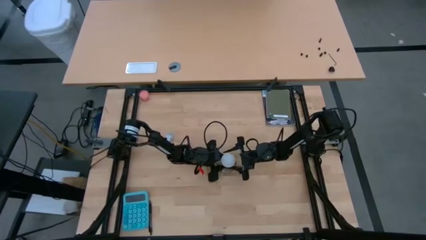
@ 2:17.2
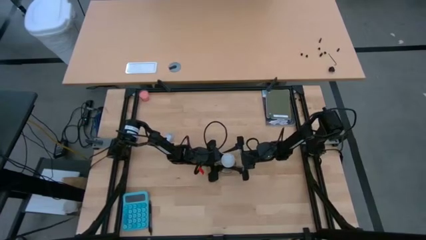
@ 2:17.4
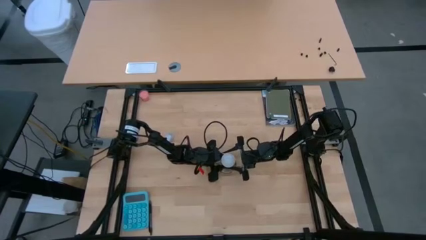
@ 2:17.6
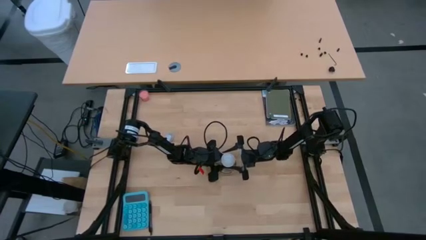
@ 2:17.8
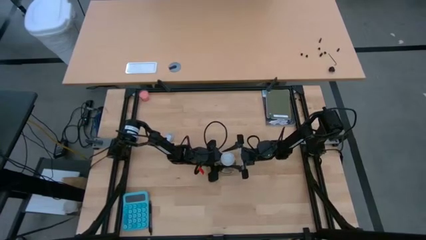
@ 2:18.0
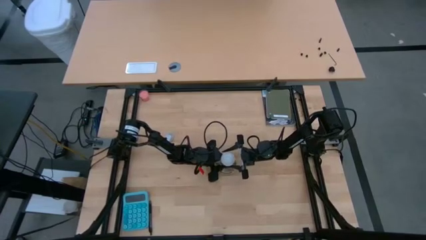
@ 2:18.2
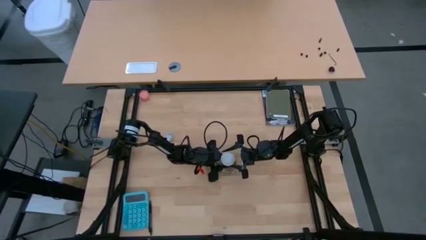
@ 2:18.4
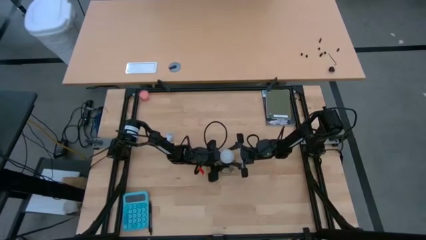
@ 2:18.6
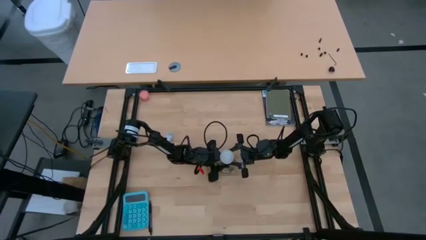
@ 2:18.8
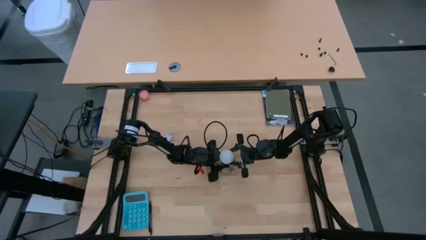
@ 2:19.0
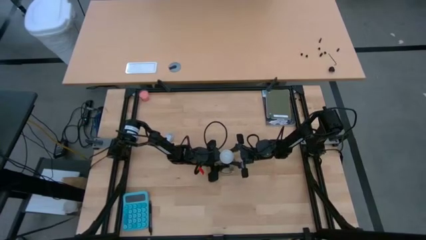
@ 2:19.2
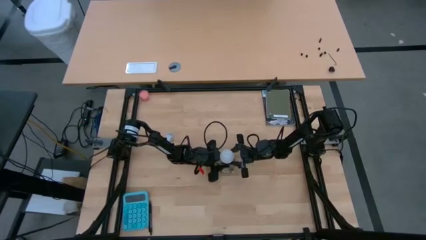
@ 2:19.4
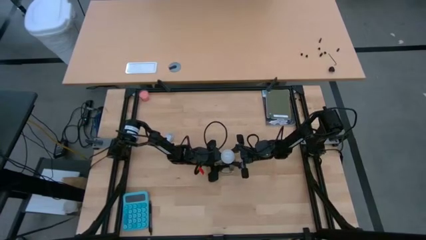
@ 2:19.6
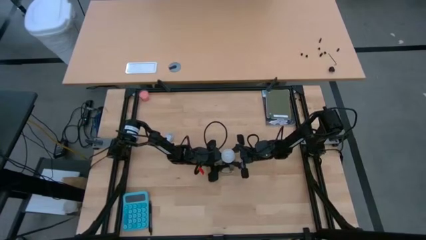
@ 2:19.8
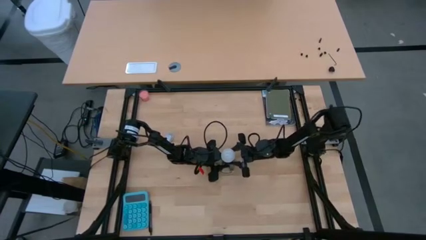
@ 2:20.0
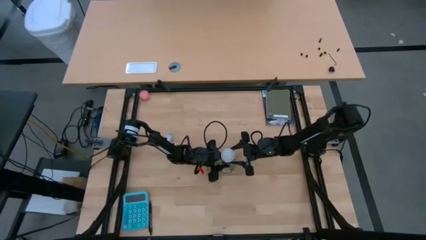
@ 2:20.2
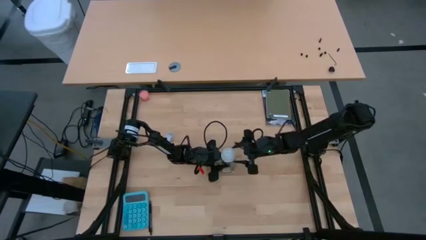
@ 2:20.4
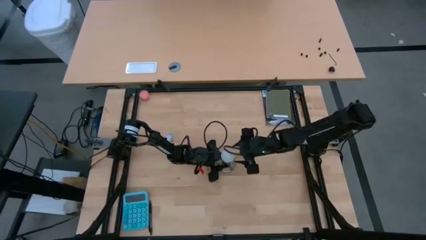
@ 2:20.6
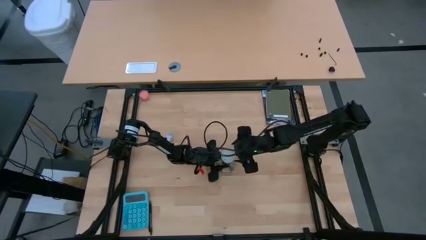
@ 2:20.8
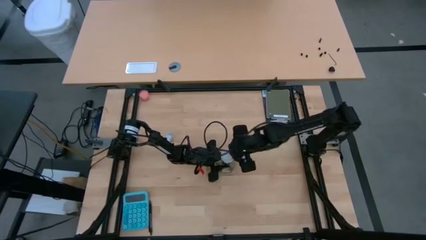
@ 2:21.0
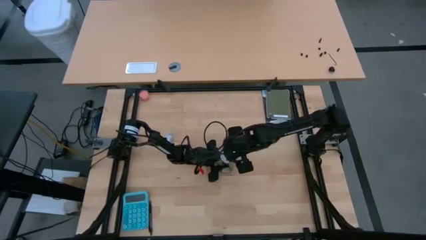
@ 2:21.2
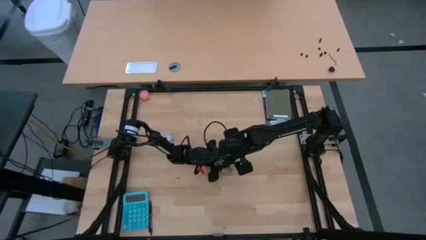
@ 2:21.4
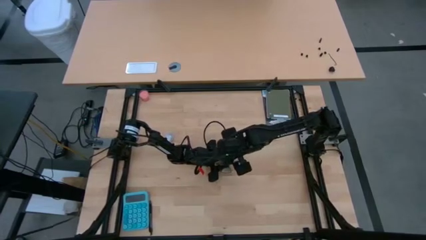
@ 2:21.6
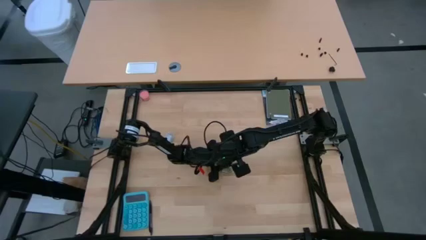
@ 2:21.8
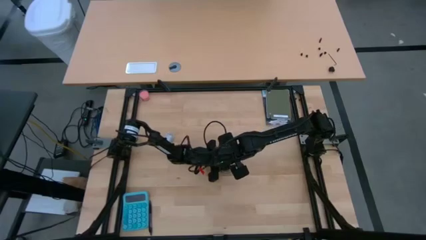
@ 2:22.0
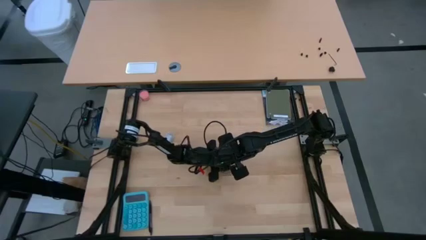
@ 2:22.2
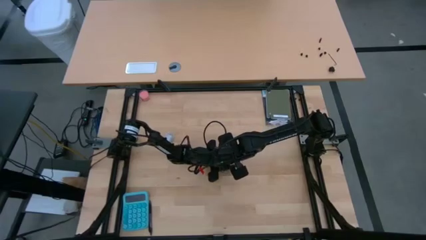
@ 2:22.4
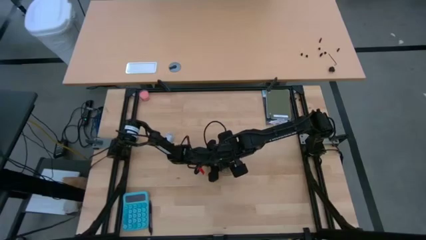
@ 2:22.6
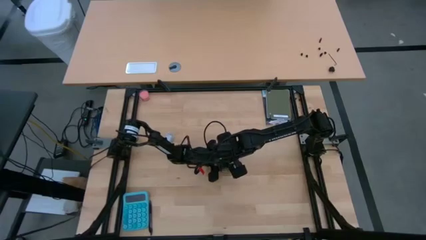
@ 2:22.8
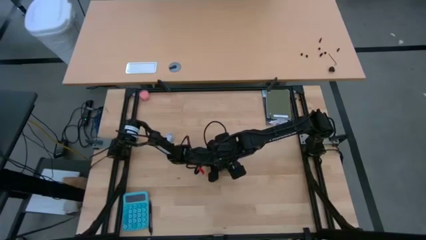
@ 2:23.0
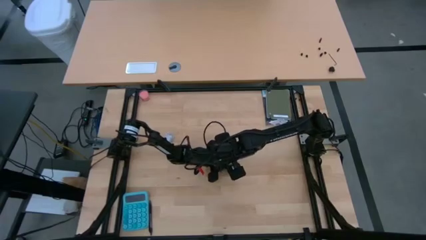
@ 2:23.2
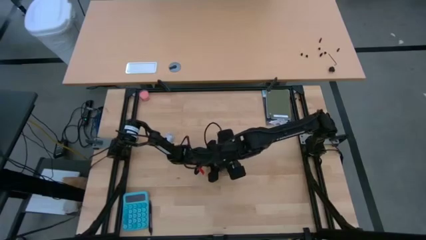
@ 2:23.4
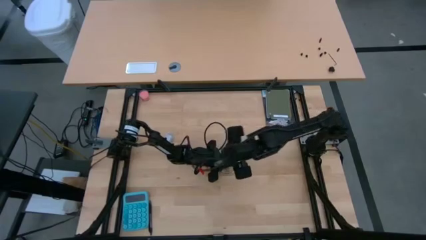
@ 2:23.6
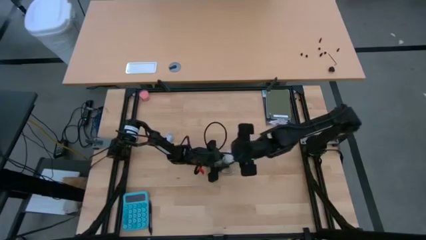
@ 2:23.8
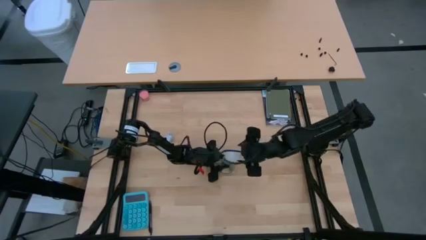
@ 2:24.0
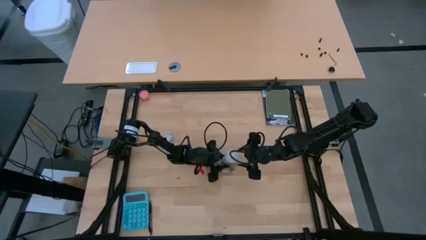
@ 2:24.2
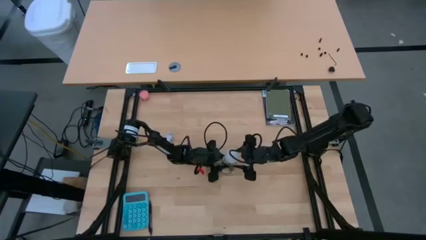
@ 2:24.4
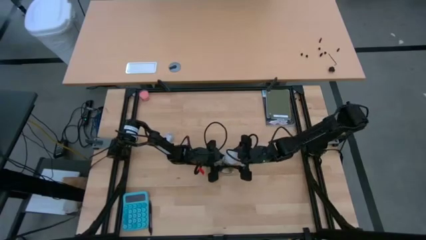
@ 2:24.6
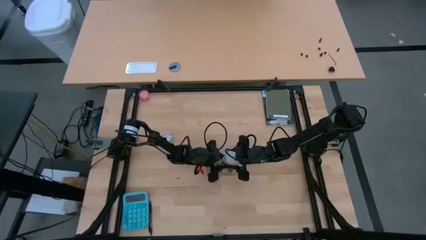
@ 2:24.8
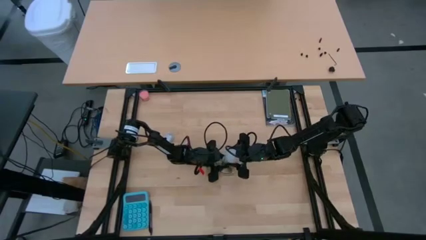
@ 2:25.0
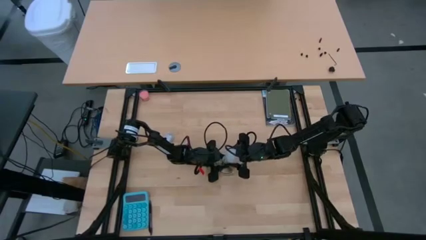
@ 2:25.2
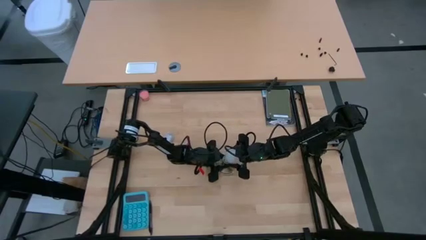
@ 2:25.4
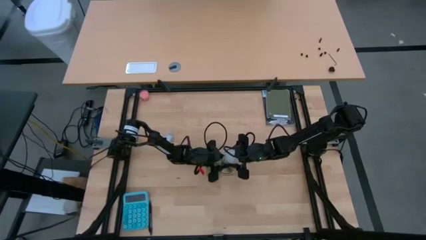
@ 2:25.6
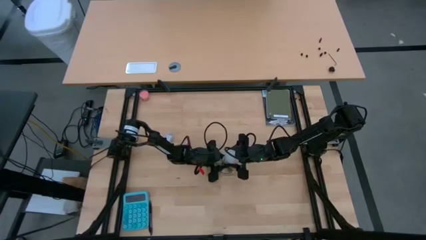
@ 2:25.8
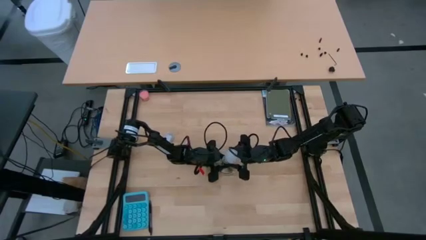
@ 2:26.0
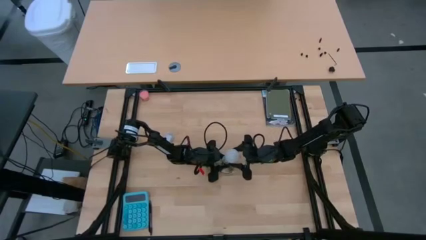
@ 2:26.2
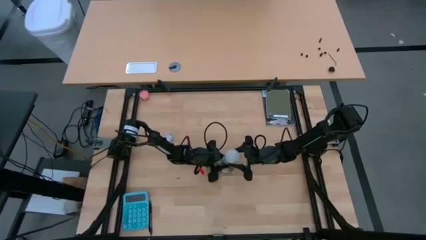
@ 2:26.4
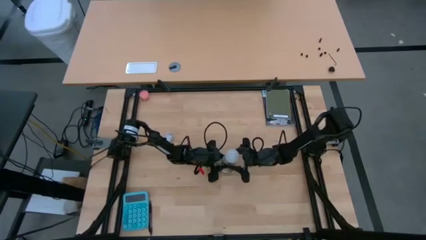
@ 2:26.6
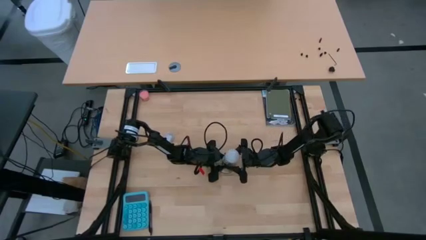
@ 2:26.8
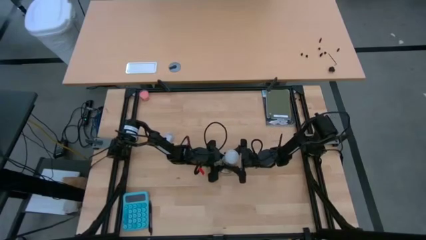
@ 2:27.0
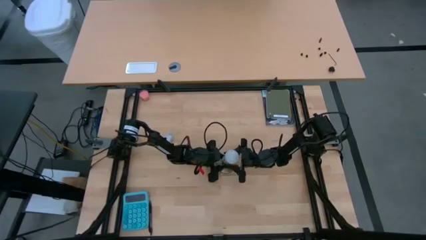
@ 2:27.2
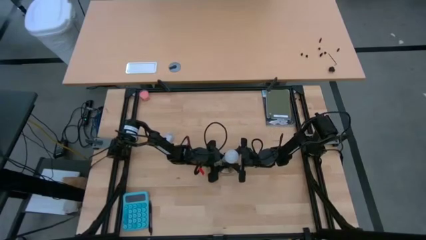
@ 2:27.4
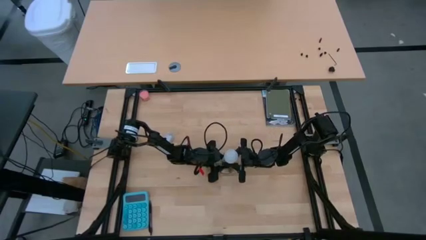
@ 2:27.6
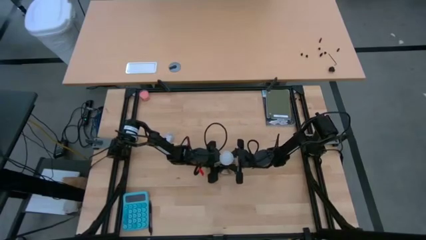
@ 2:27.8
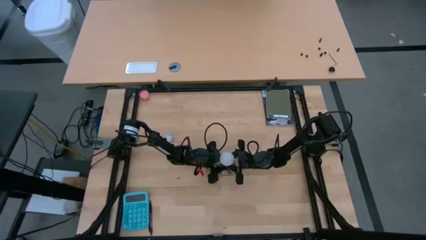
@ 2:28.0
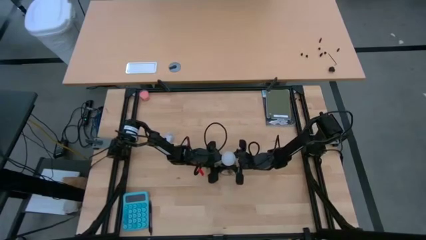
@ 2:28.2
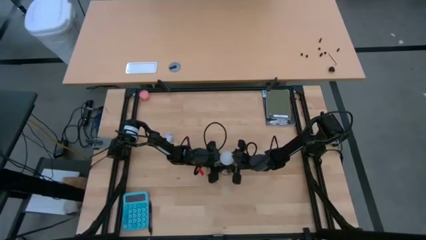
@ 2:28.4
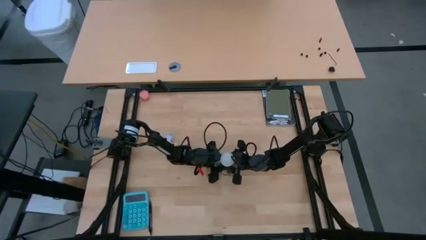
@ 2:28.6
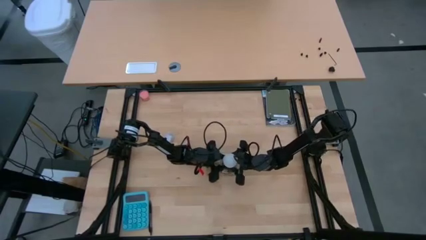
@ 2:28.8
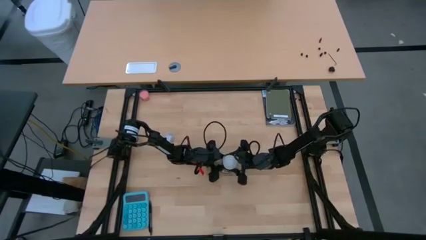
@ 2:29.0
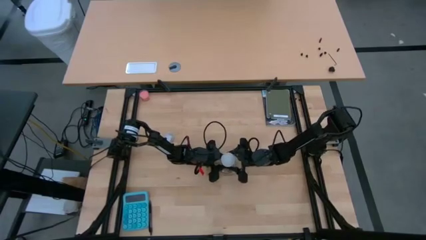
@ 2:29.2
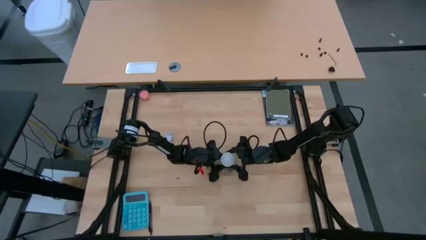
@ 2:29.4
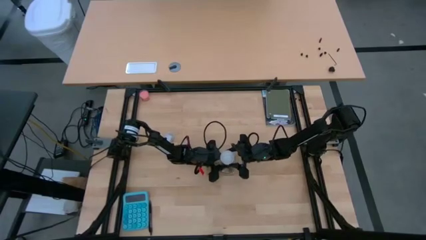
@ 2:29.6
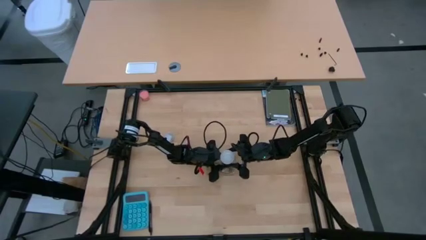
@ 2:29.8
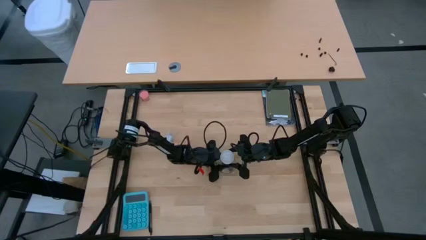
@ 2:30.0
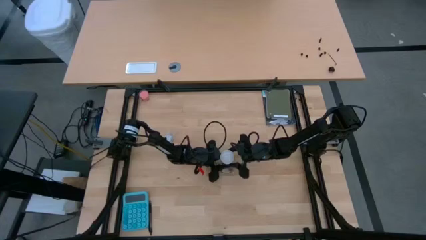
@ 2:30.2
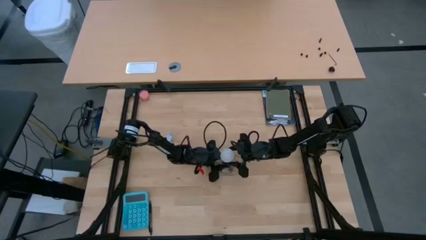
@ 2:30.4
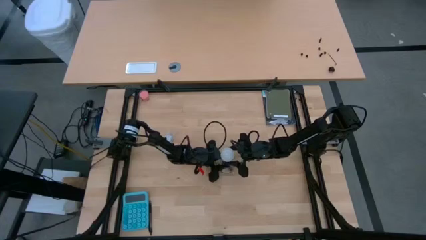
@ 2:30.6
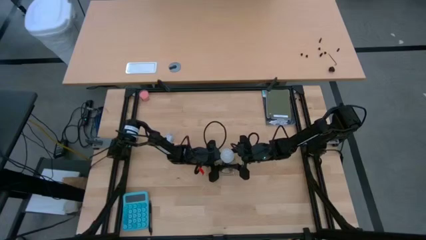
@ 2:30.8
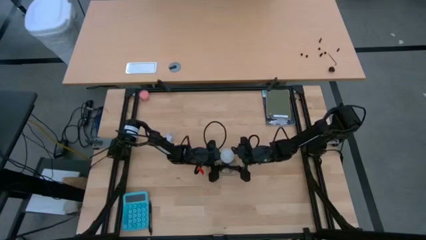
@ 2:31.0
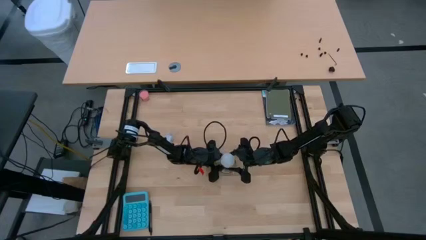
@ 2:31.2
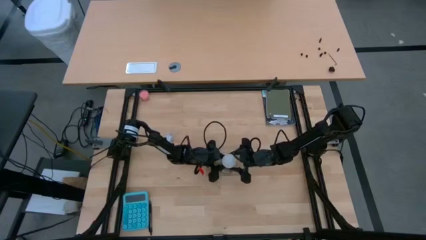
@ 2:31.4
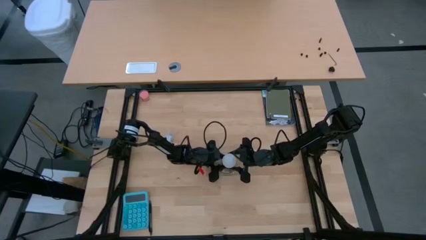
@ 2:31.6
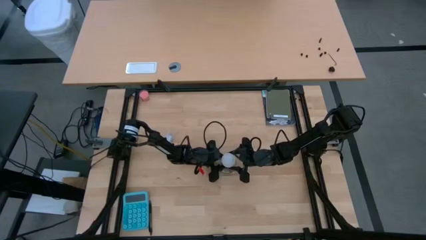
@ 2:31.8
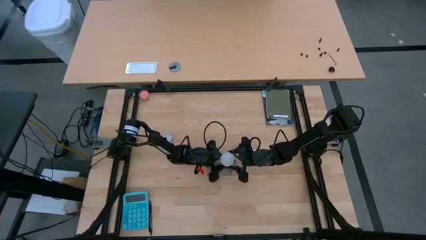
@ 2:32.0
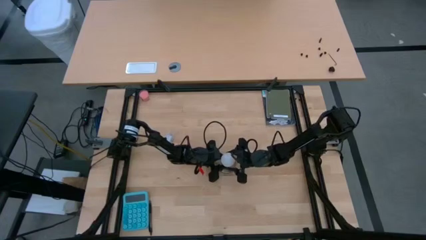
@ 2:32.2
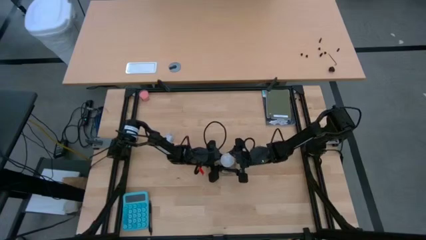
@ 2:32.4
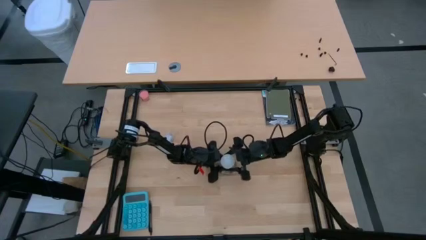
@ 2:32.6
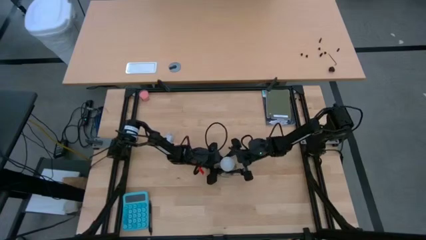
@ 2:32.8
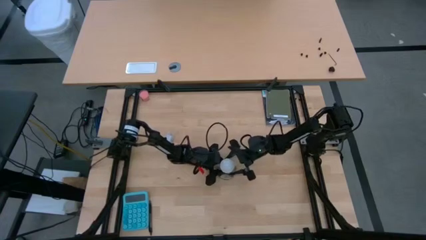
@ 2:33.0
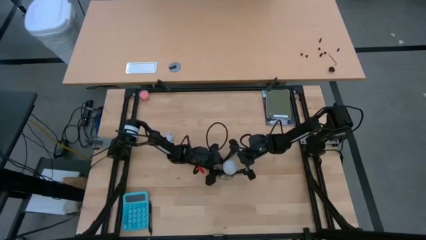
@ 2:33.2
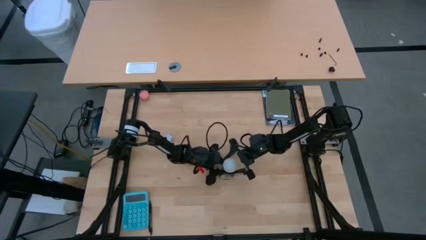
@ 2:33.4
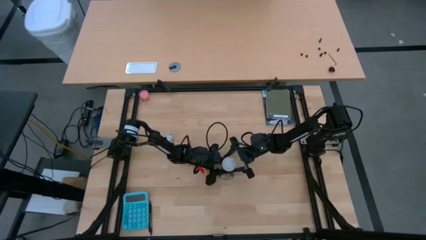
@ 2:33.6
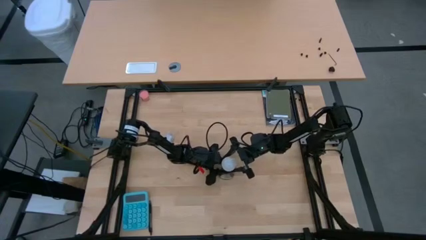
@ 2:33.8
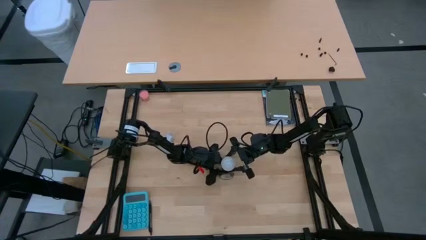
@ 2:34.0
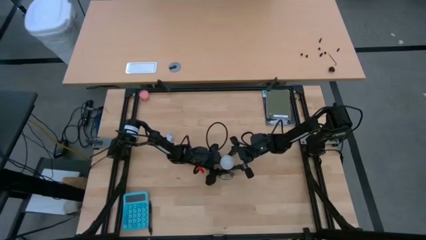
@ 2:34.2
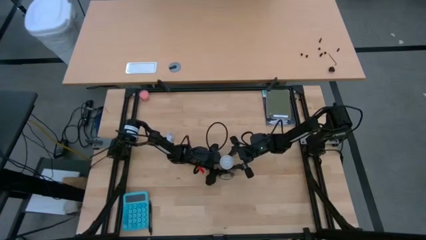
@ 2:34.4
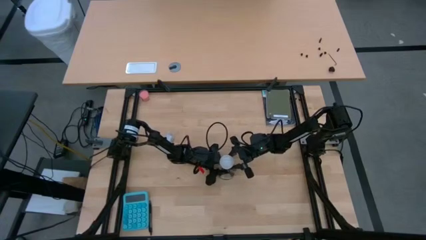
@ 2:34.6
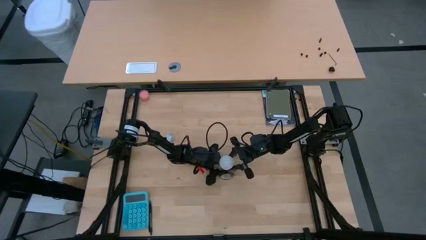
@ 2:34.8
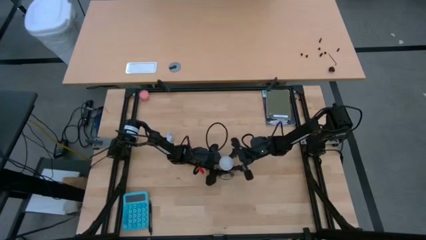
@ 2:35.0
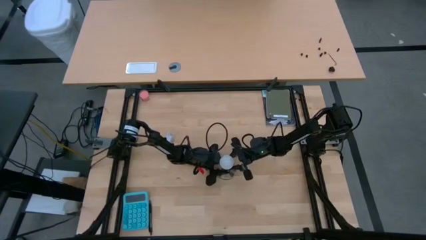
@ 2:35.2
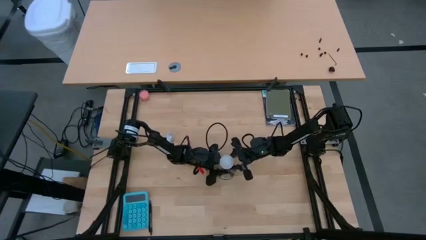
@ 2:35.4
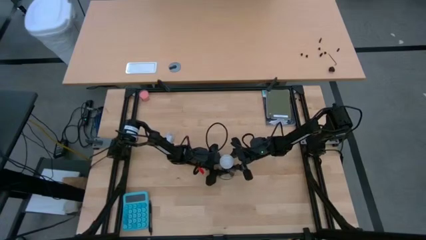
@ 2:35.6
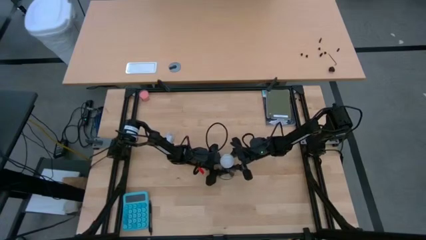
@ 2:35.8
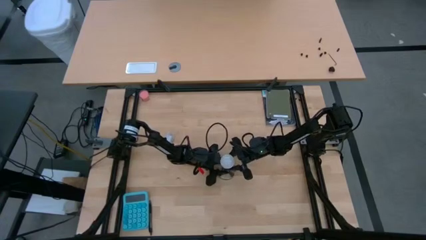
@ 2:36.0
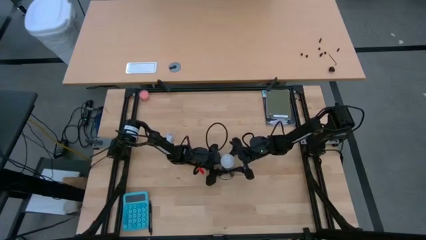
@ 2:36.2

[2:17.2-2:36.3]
Task: Screw lightbulb
Insert the lightbulb into the lamp holder
